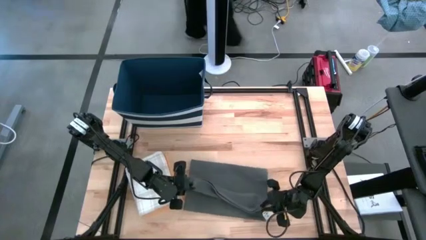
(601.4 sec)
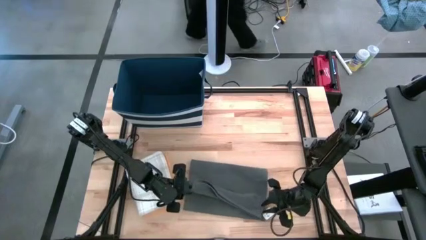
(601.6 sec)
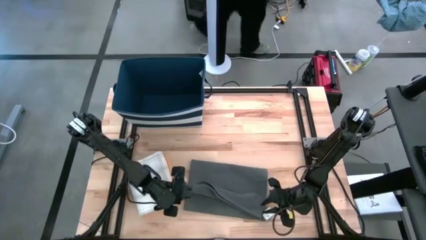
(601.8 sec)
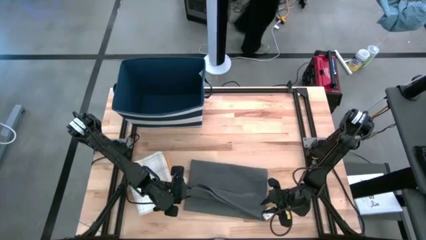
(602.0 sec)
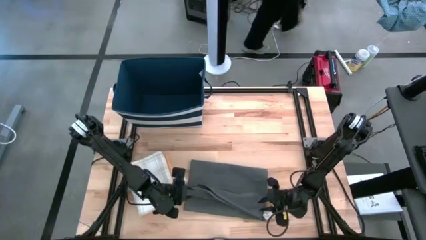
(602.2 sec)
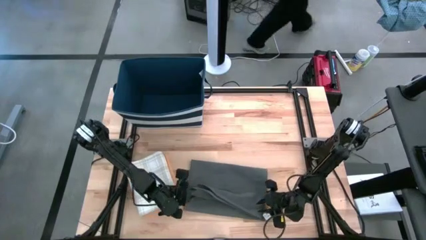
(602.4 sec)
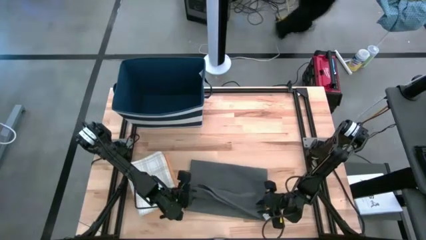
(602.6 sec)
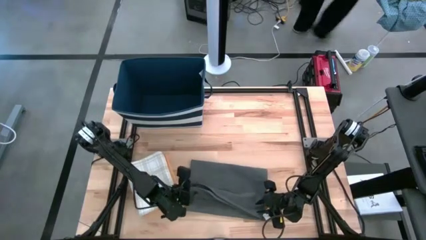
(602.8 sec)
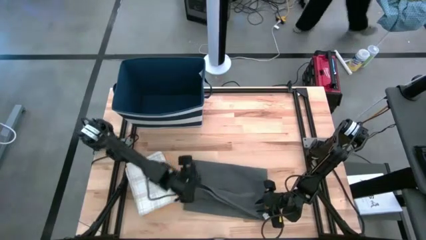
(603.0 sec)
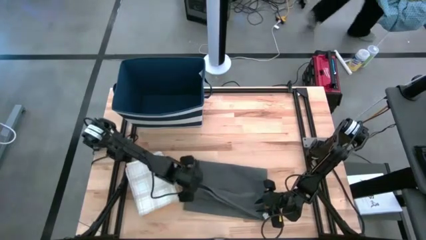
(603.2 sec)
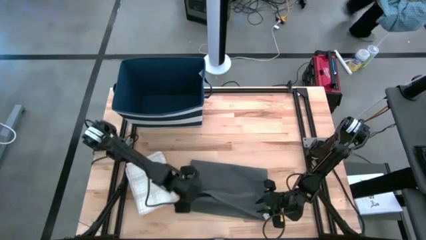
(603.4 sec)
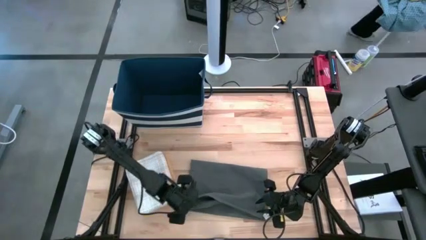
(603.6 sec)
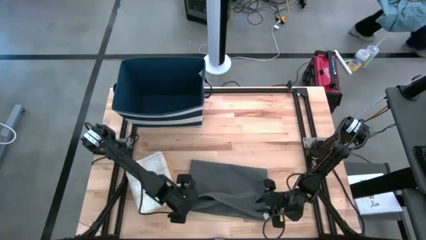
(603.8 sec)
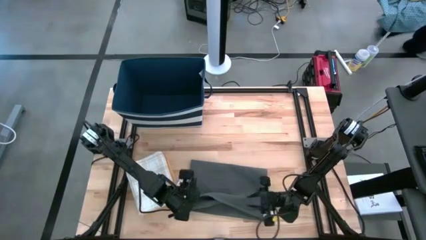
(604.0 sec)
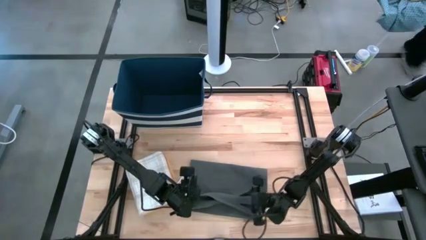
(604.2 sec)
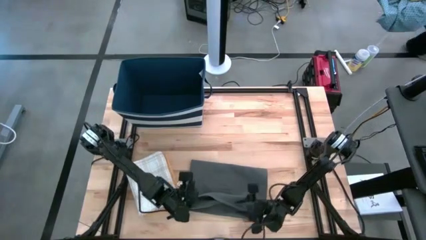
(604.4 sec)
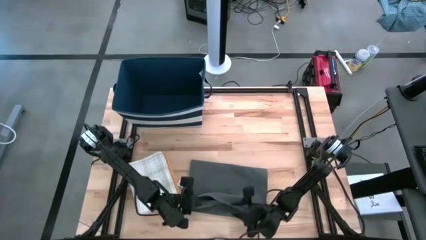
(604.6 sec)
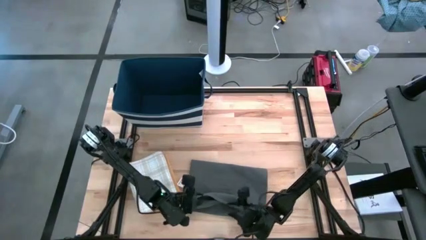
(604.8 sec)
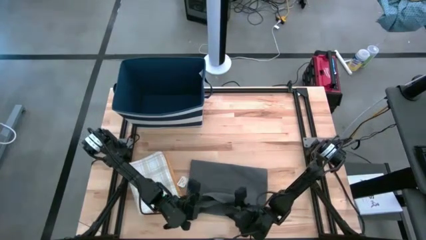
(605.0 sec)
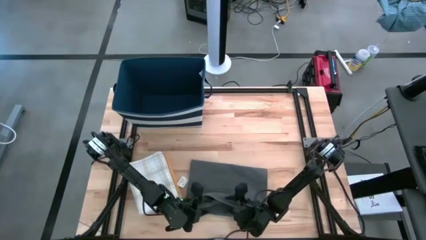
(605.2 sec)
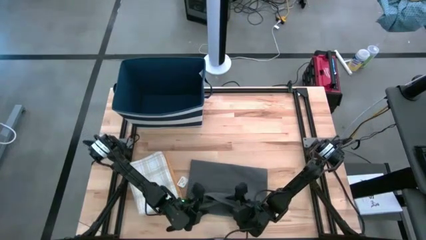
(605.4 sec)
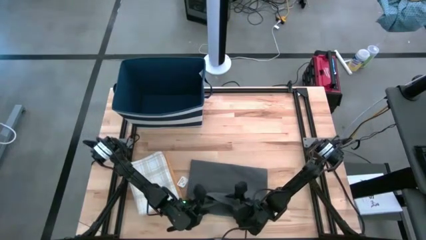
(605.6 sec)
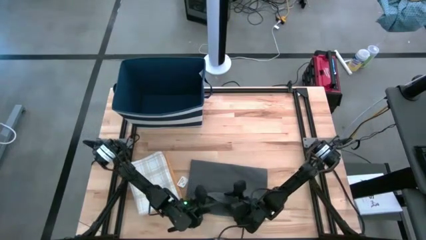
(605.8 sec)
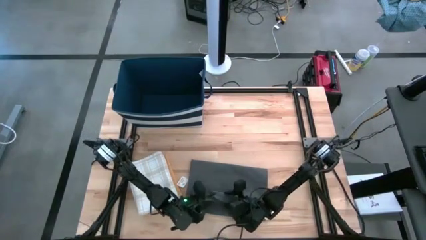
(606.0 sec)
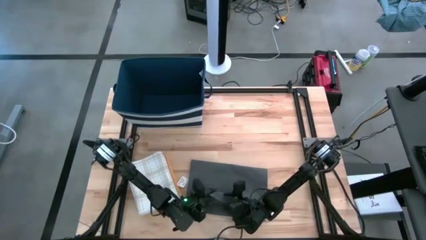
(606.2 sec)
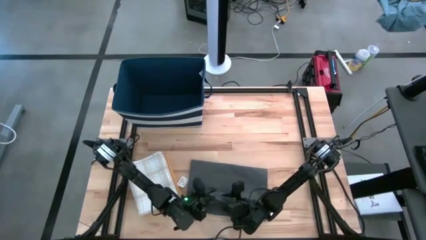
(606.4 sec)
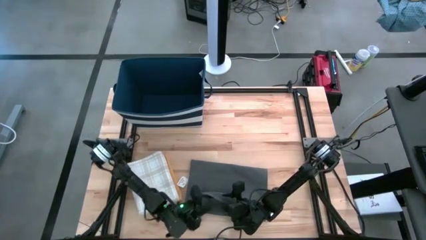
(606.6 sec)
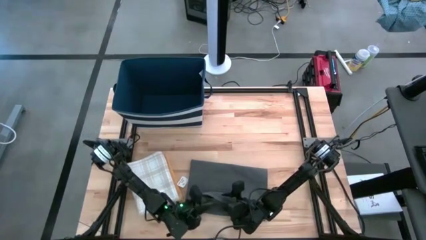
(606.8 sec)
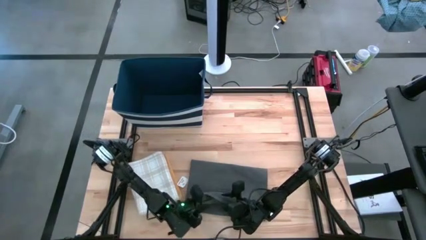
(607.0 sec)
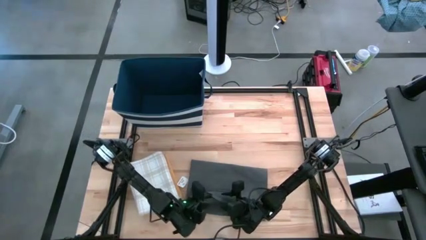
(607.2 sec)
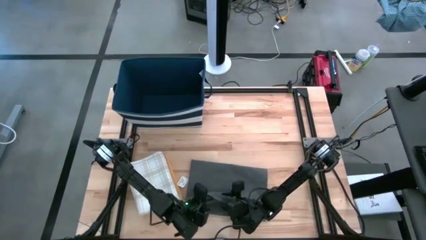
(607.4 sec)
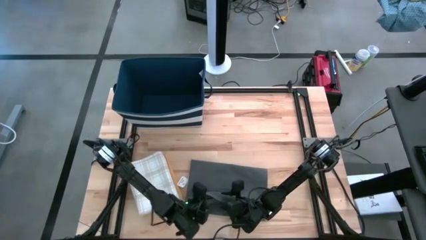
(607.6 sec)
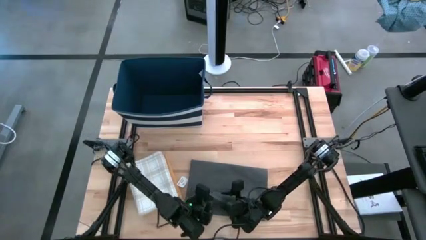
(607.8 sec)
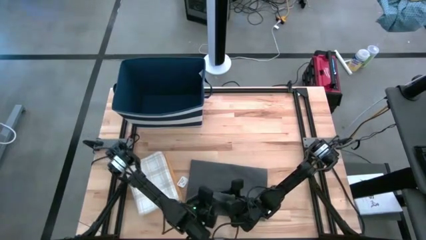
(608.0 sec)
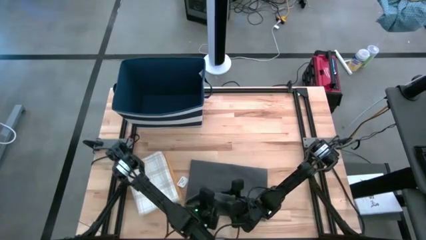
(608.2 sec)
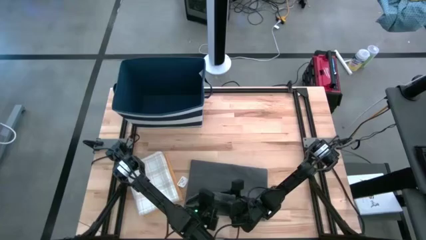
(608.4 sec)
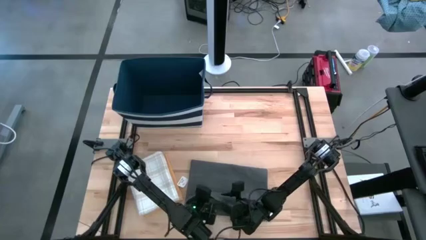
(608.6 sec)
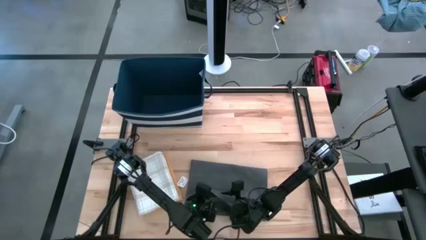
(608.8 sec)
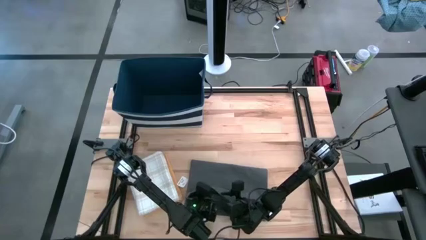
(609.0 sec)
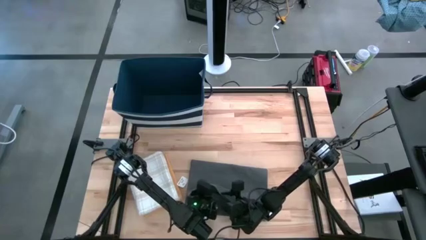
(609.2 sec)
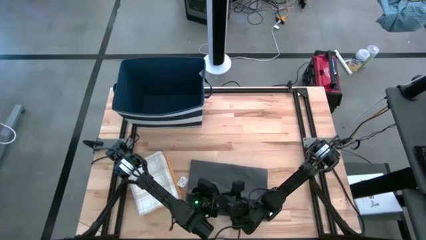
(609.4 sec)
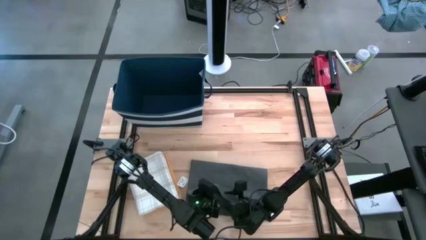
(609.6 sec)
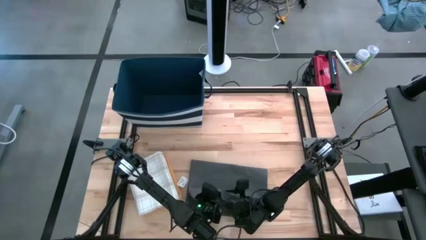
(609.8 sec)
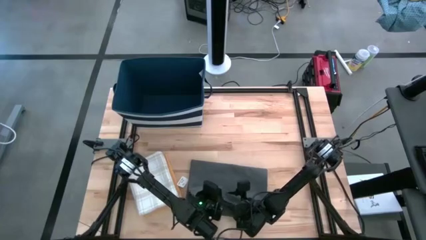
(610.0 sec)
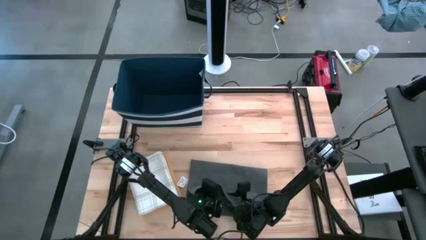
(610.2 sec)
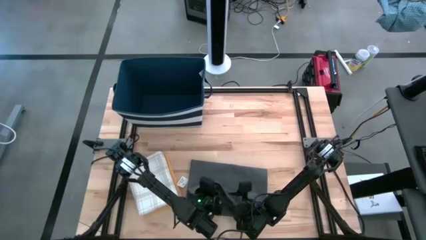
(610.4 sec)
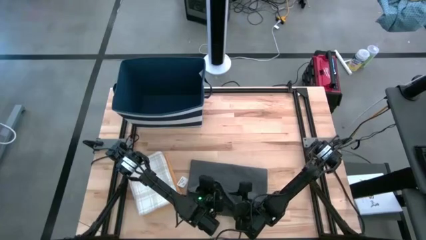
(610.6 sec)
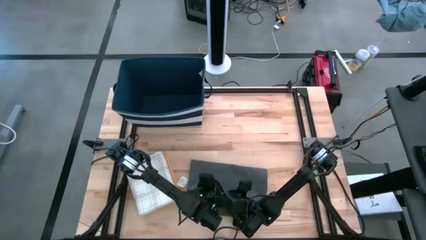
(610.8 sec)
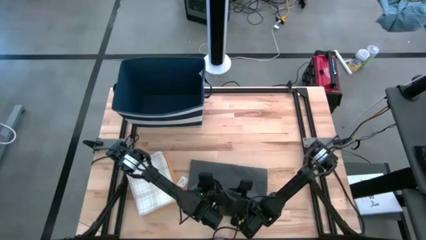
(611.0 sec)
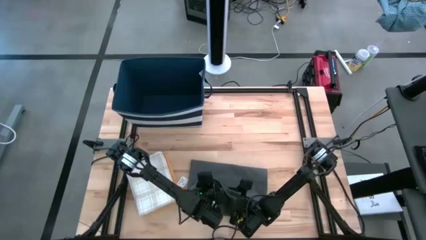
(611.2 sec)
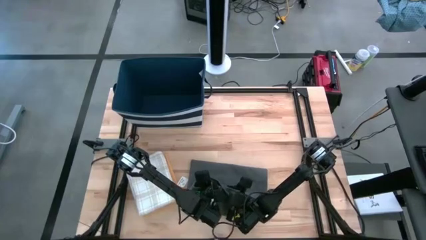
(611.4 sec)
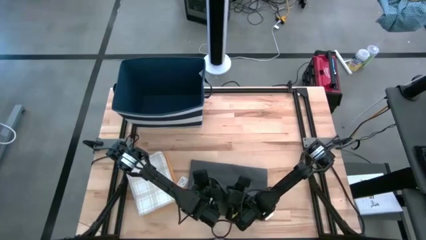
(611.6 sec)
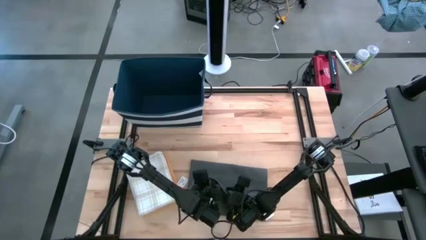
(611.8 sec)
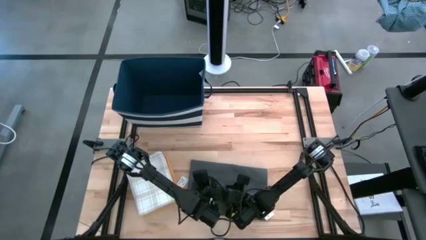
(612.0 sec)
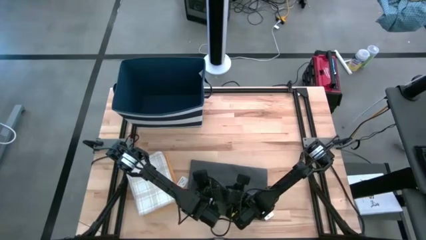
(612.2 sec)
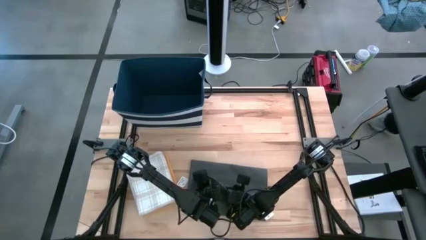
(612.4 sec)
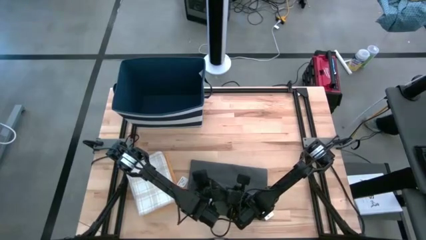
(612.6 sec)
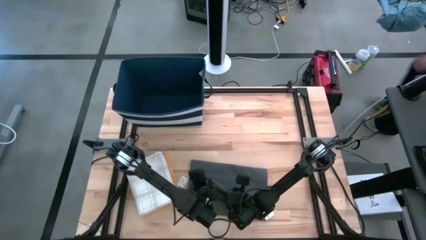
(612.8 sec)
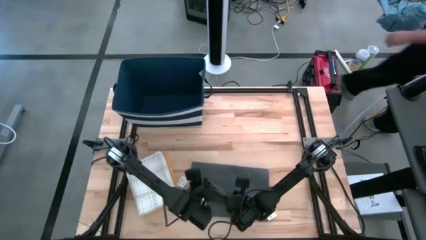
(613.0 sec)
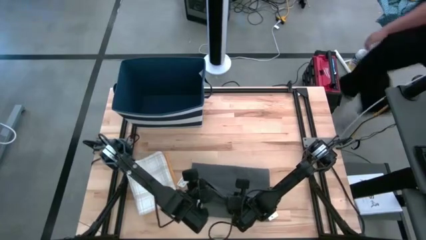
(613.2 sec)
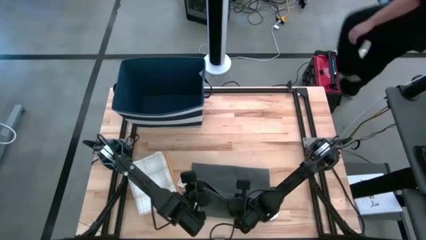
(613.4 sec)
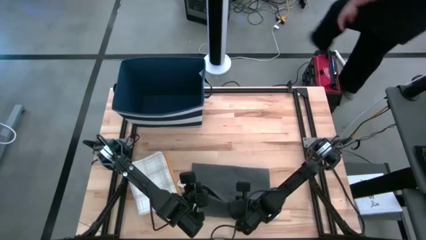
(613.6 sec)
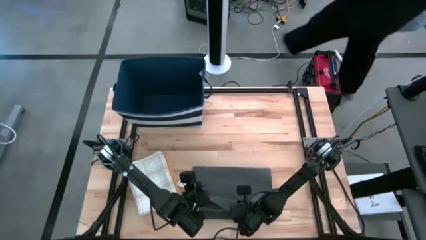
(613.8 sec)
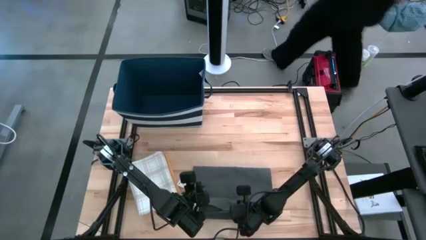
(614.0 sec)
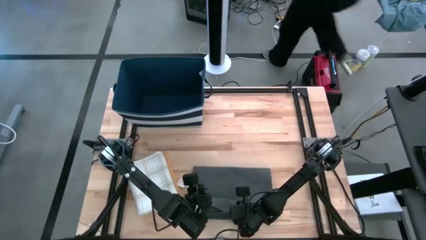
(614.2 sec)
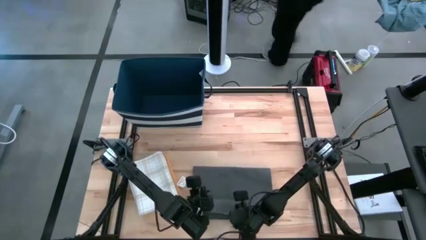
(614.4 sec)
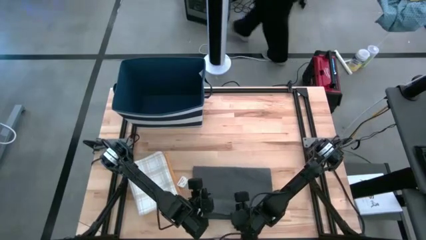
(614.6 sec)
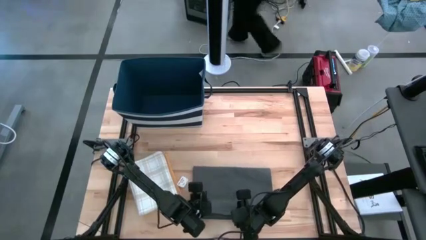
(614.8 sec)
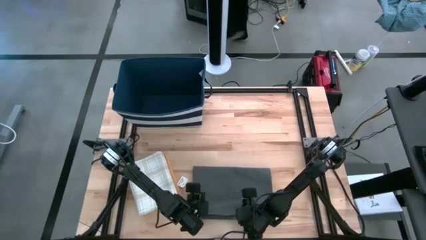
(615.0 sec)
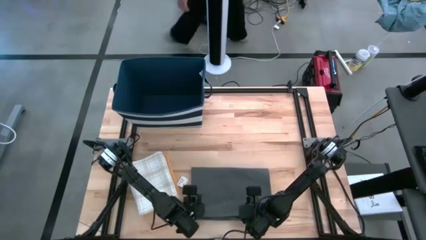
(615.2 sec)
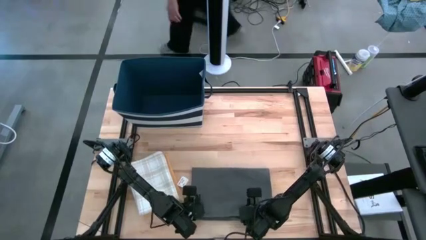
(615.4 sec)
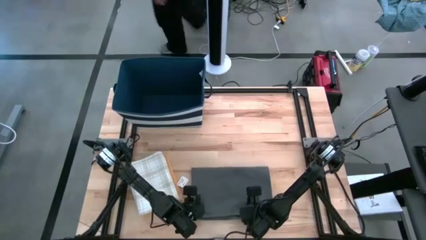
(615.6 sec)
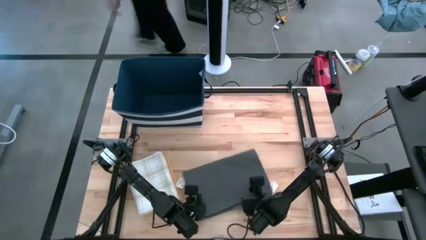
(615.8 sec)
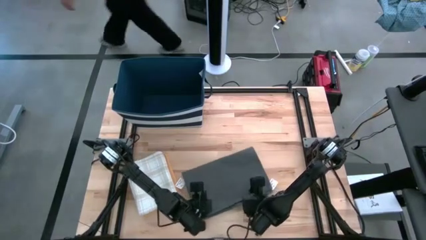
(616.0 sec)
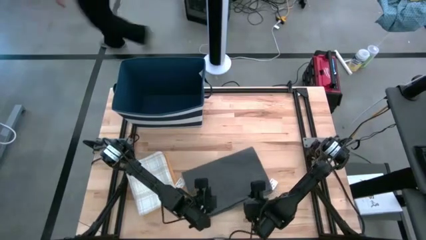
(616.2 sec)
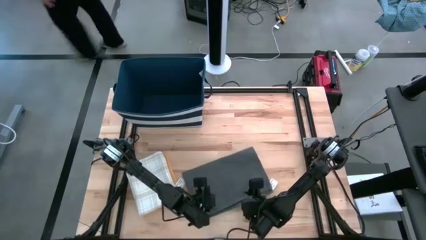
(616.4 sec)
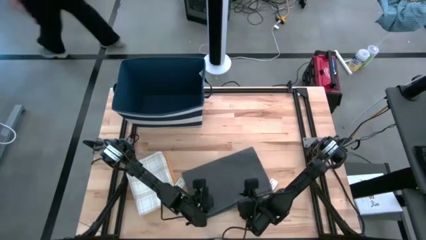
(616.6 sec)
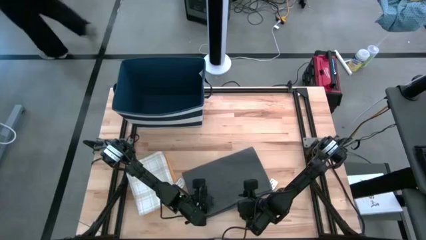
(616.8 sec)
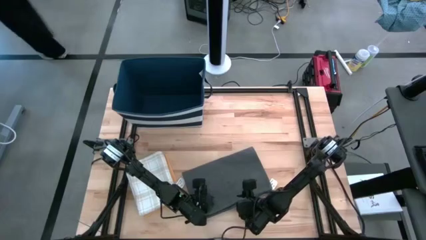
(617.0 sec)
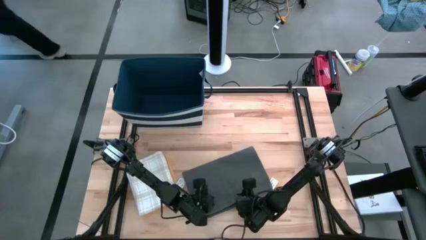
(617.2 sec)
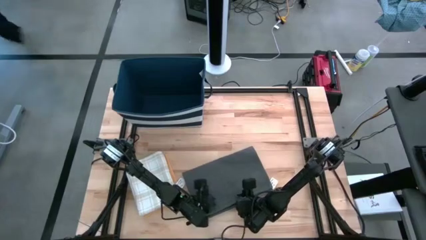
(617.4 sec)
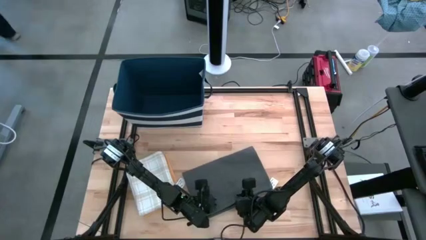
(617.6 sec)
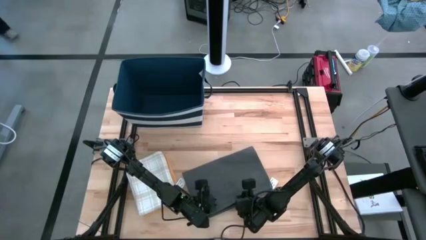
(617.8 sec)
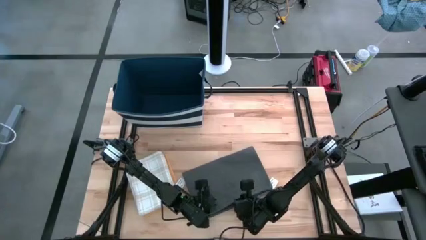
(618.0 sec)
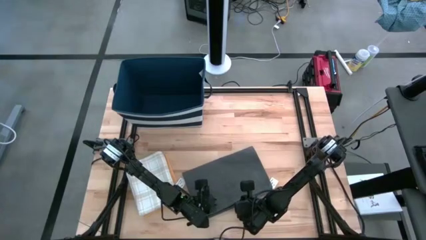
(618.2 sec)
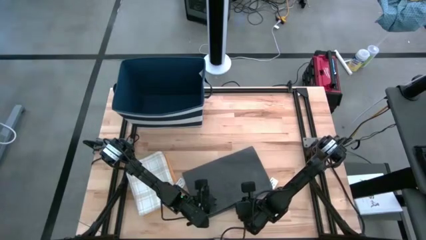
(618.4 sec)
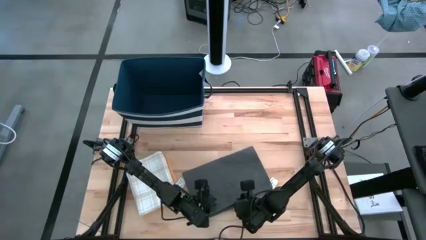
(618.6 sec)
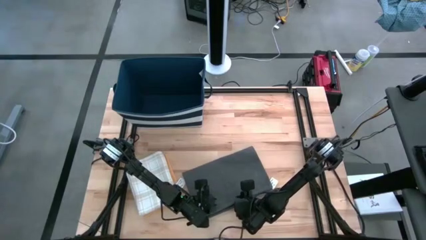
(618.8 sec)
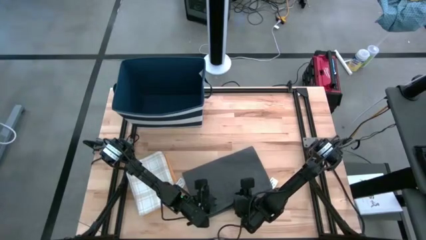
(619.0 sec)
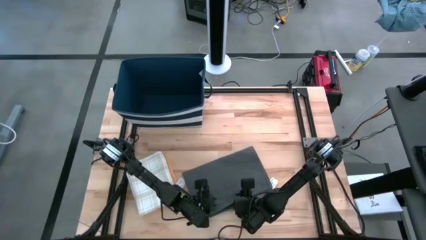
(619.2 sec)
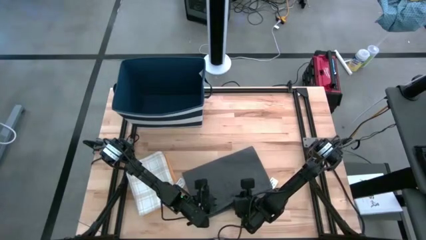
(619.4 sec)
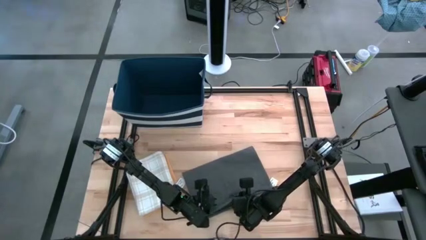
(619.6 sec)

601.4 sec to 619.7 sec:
Task: Fold towel
Fold the gray kitchen towel
